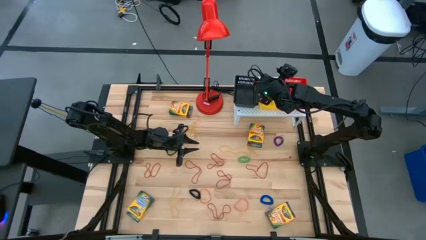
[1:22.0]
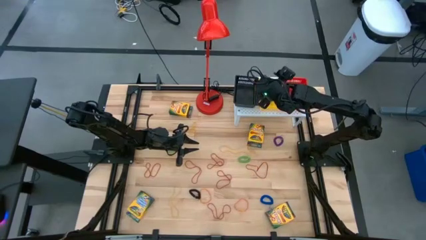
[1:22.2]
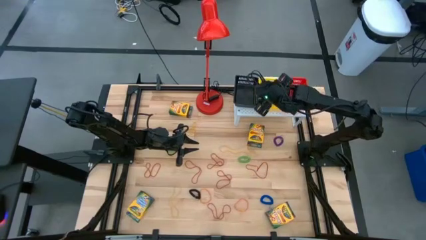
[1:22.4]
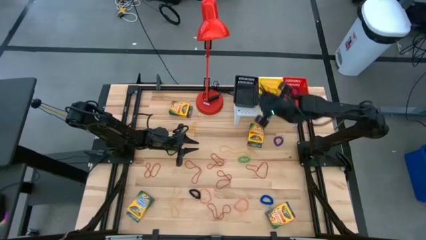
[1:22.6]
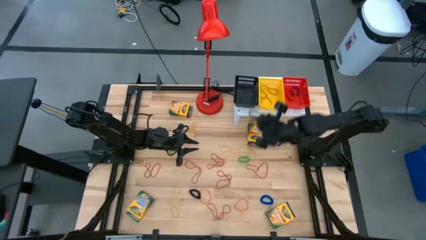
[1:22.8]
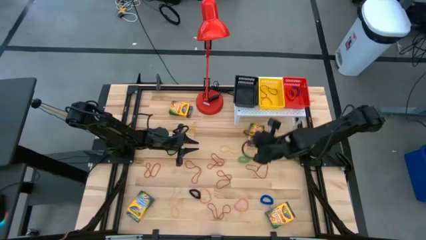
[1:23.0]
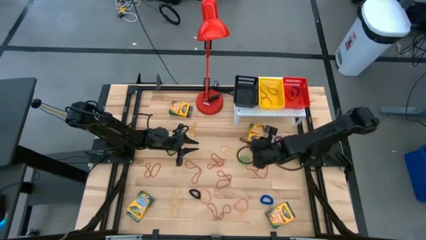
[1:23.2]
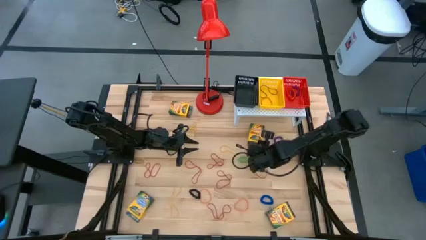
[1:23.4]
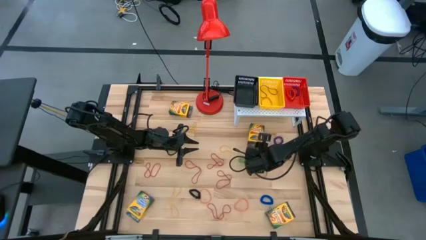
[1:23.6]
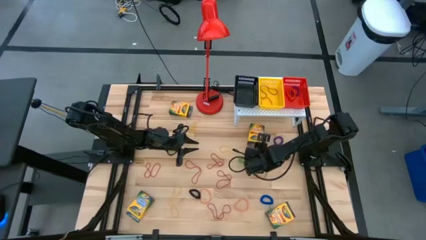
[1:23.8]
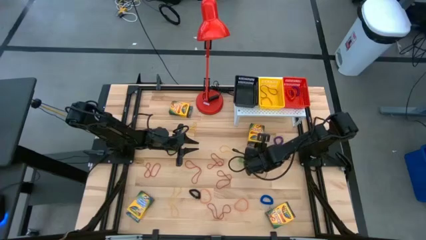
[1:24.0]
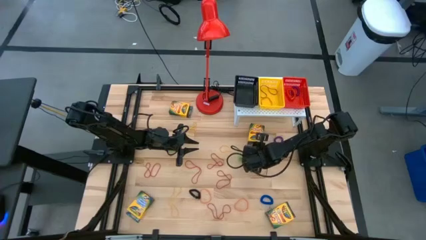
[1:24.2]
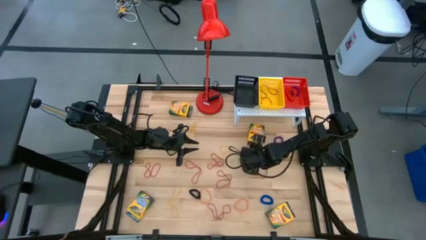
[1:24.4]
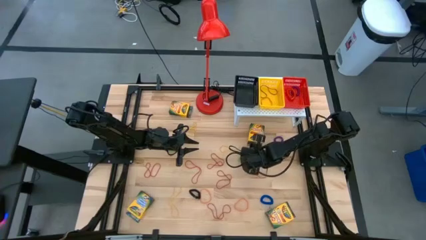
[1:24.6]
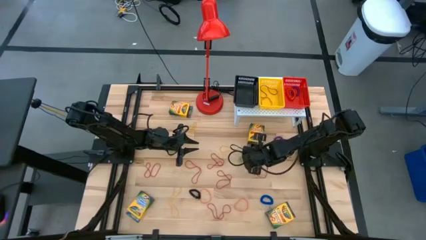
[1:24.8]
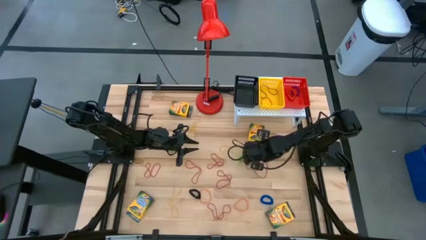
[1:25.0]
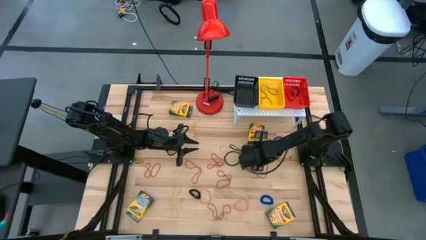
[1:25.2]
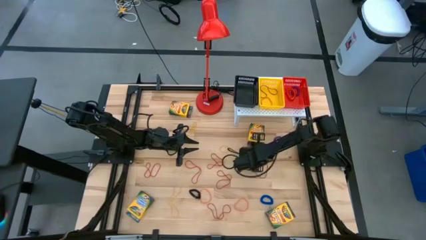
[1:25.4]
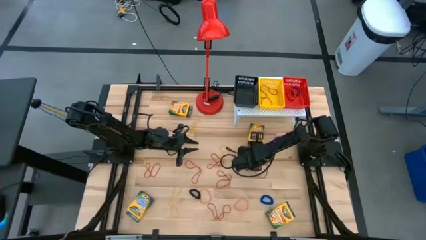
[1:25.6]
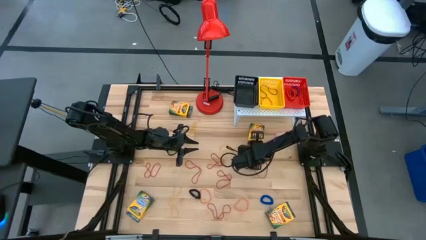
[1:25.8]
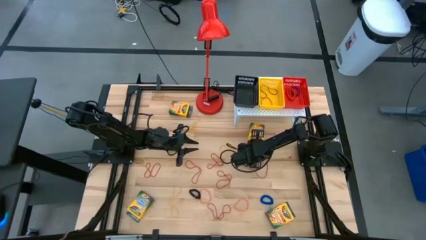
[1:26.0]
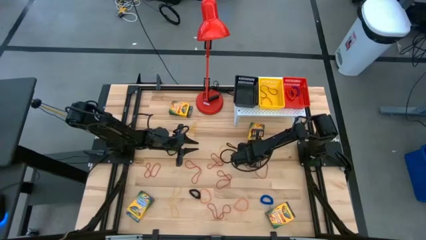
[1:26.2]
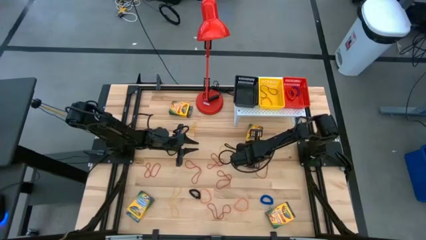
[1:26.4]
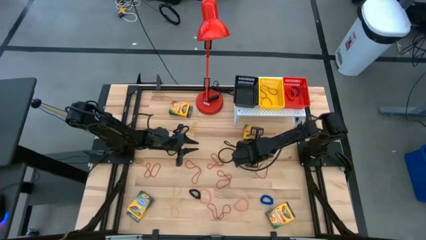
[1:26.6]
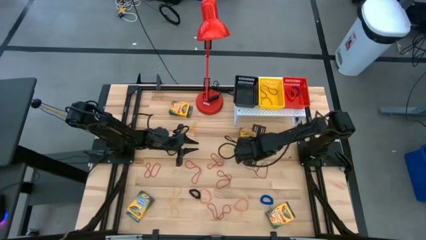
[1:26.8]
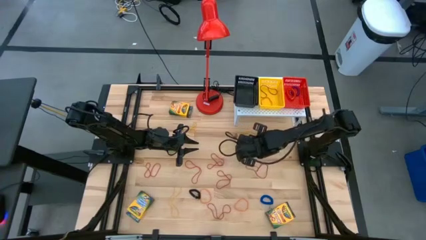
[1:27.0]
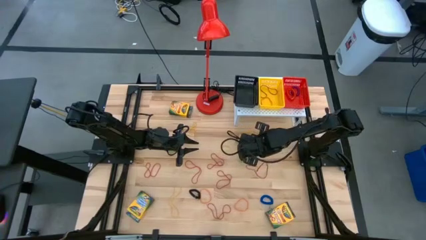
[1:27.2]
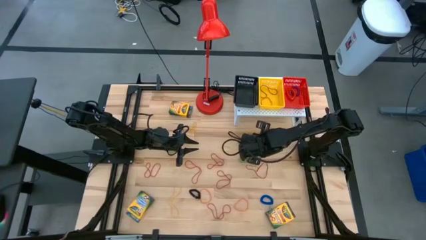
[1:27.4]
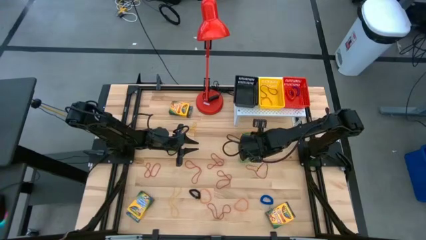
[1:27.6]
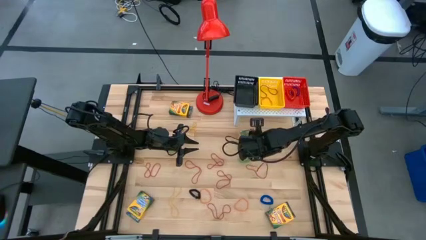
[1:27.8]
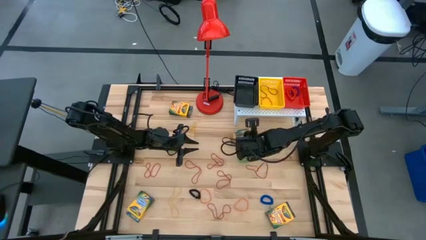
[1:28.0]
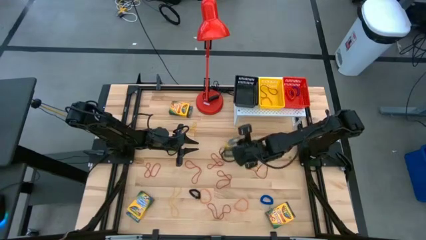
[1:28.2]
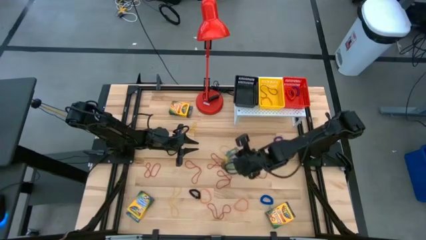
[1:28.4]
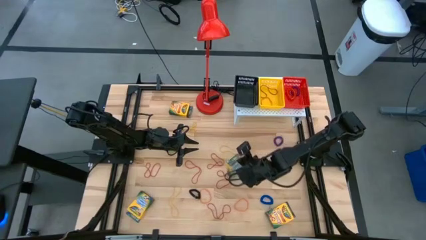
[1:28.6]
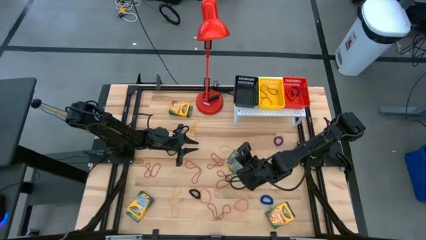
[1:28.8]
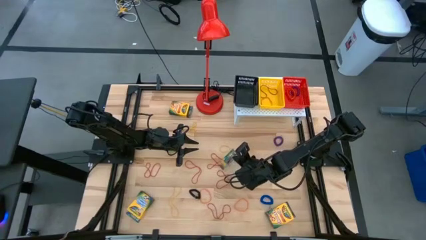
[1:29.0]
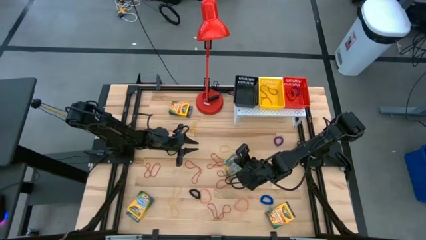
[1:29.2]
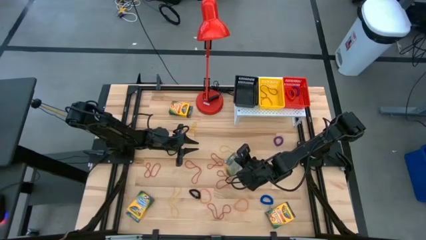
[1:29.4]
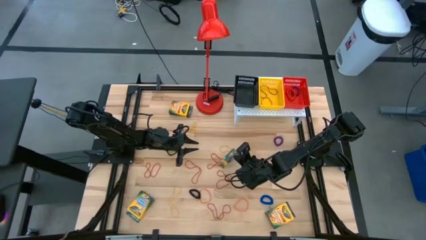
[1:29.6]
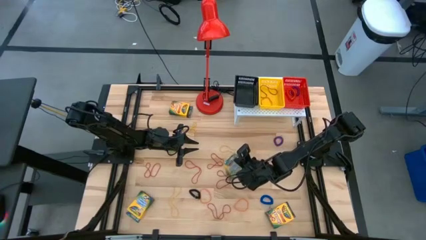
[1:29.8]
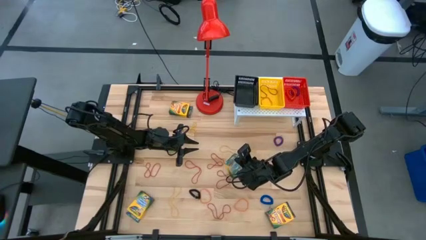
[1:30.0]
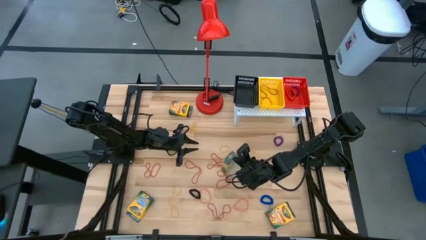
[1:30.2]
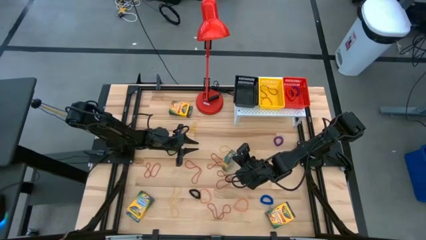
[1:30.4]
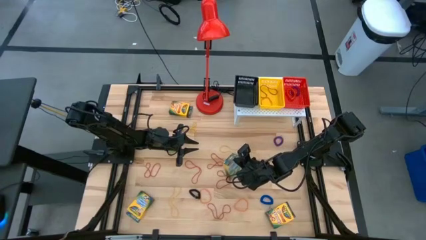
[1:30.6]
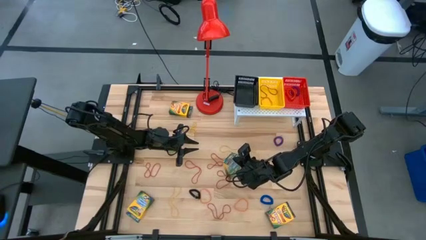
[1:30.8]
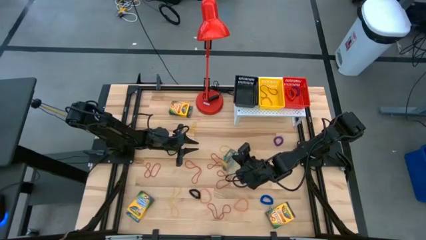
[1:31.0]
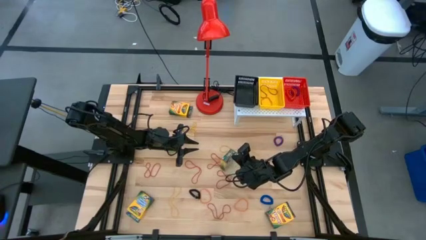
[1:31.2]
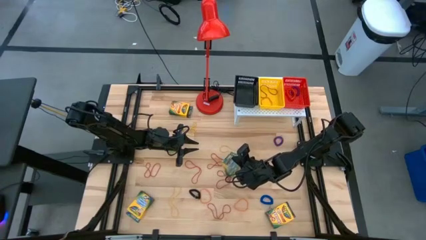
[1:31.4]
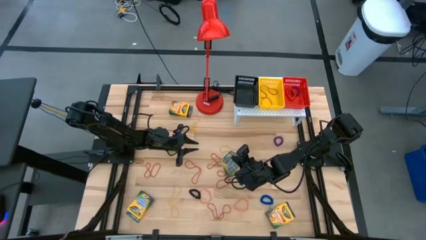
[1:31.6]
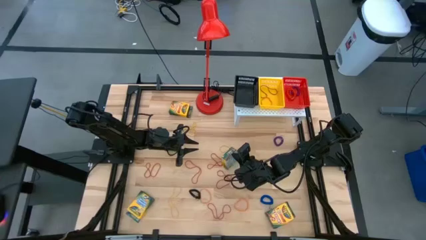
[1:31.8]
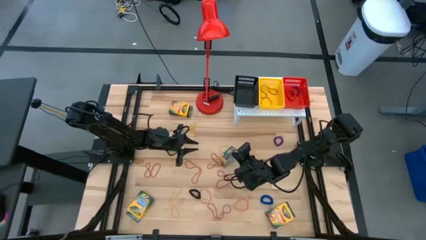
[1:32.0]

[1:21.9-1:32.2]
Task: Pick & Place Office Desk Supplies
Put the crayon box into the black bin

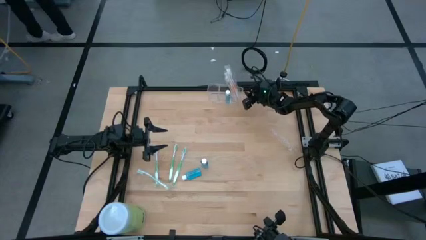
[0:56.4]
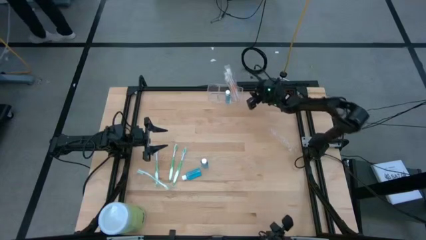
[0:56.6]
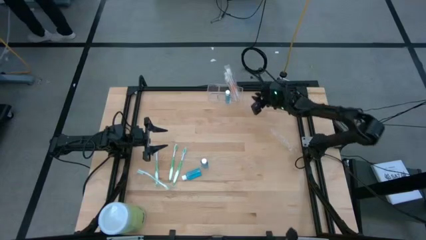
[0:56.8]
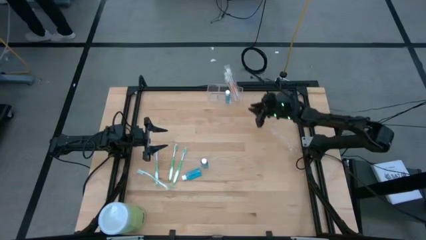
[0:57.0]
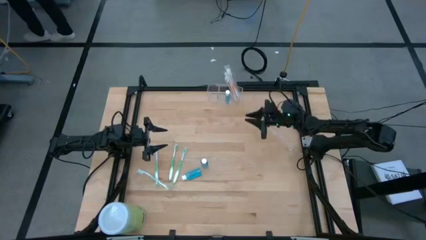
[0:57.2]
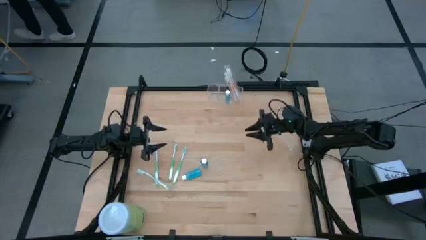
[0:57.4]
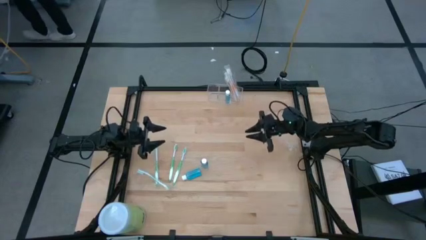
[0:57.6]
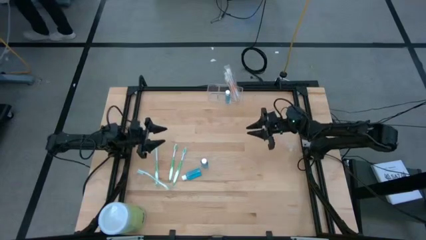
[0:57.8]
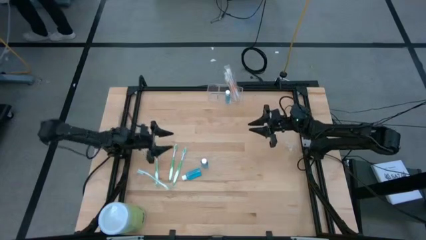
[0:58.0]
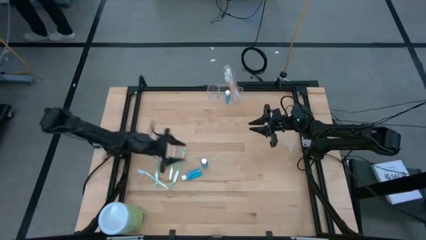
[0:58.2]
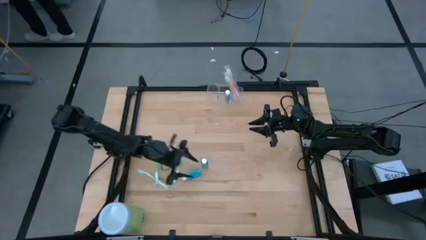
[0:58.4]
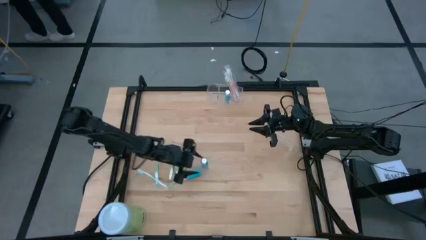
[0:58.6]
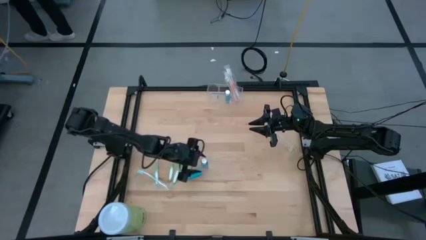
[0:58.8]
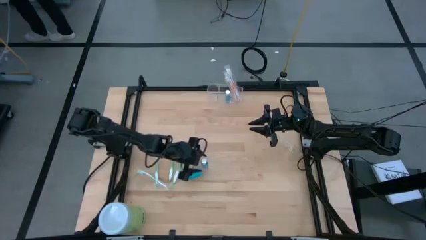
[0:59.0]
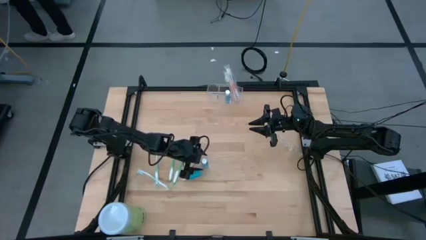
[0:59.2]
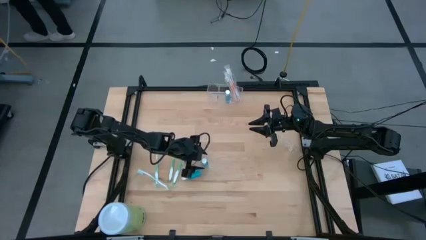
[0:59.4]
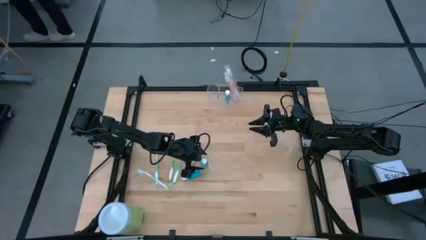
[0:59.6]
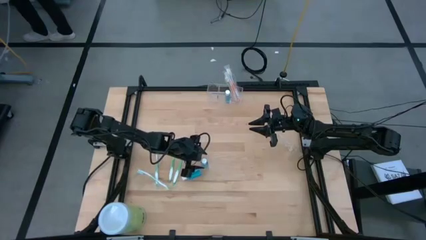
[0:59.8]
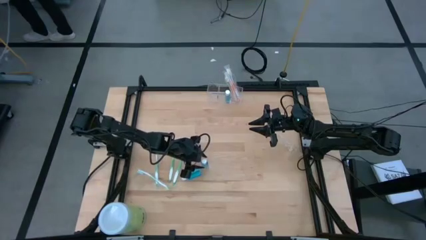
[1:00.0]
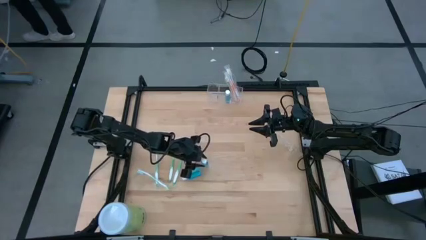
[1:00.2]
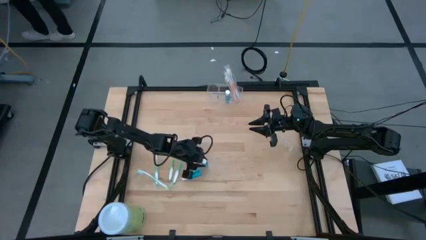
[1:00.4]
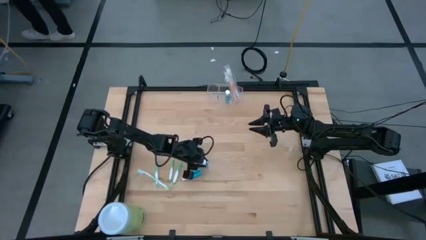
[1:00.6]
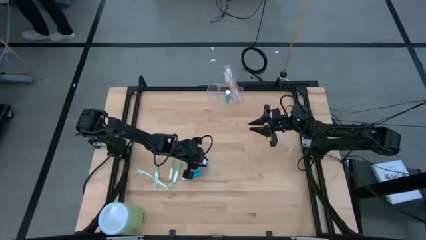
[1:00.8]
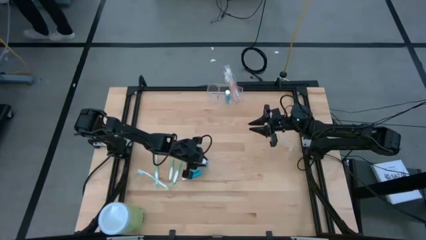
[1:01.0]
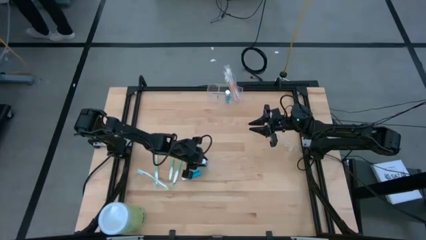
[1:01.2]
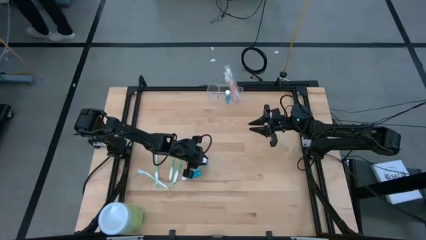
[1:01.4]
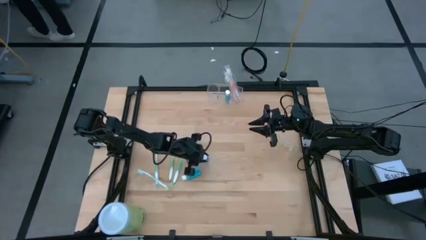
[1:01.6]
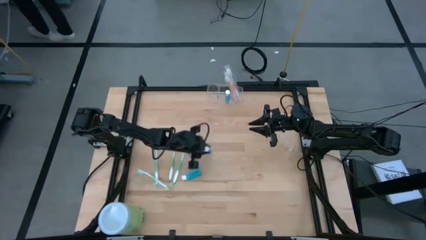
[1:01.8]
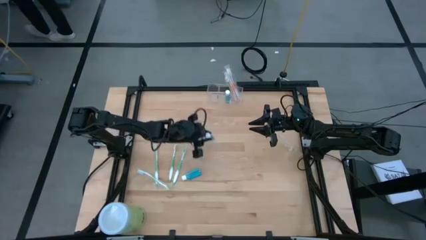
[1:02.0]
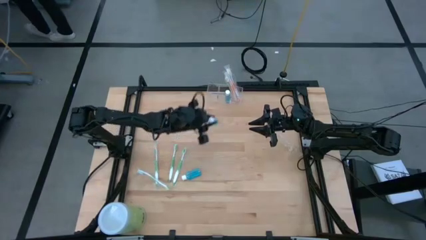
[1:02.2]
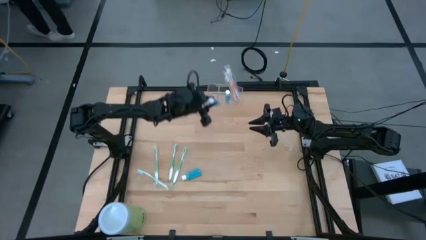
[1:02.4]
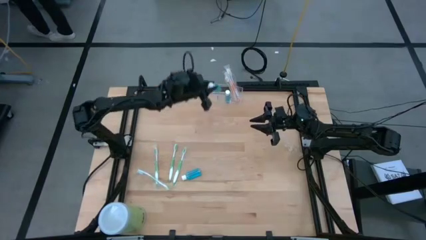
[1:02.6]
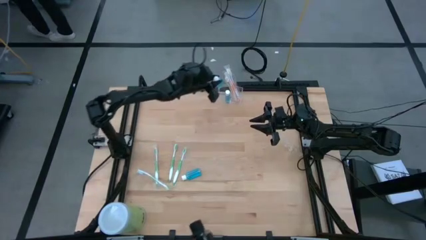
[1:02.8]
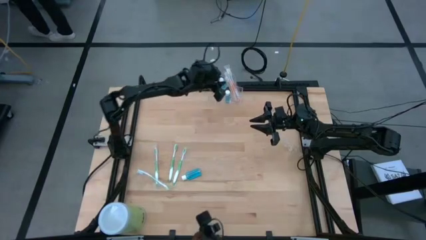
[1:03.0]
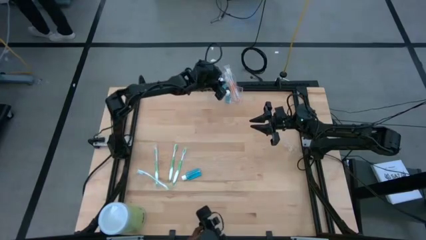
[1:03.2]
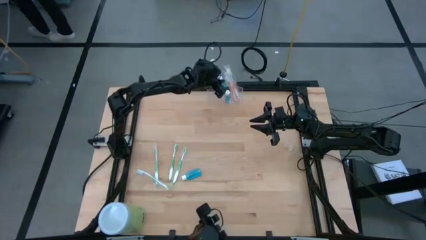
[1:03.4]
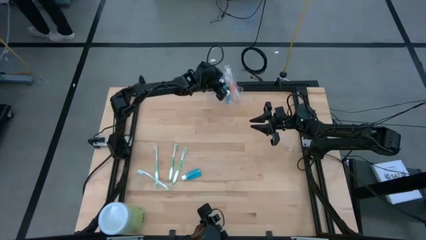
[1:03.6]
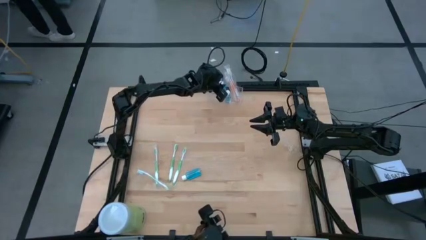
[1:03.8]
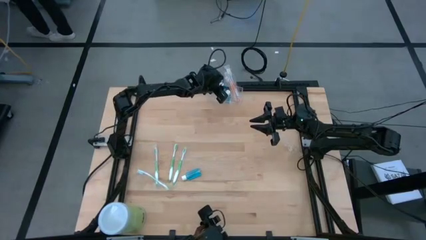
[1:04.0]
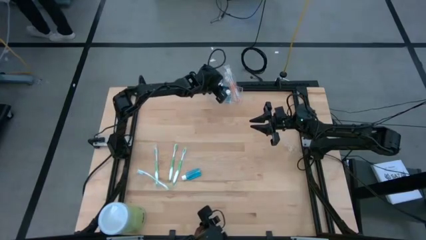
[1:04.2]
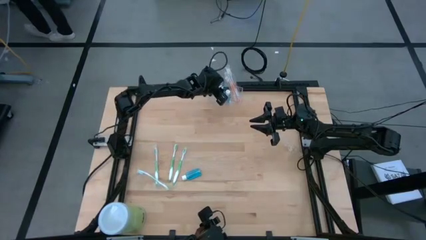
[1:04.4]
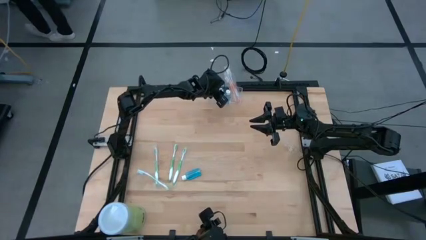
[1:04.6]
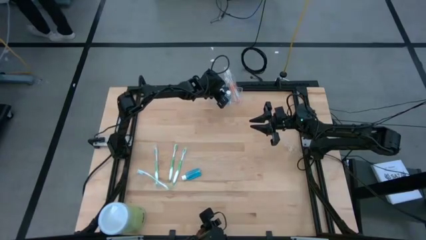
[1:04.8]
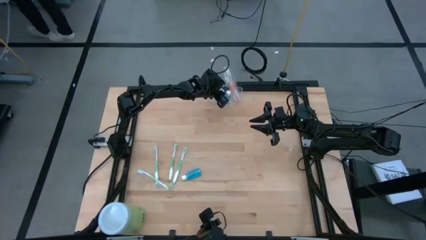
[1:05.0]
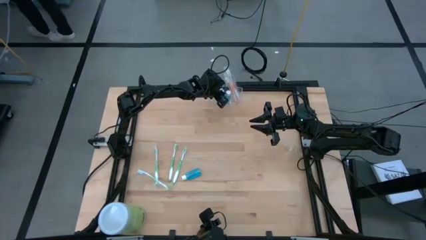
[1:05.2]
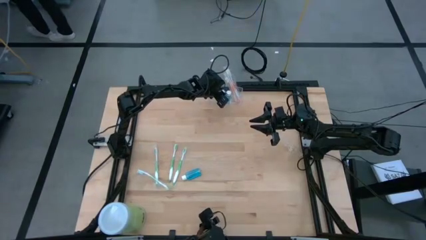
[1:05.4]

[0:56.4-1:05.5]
Task: Pick & Place toothbrushing station
Put the blue mouthwash into the transparent organizer
